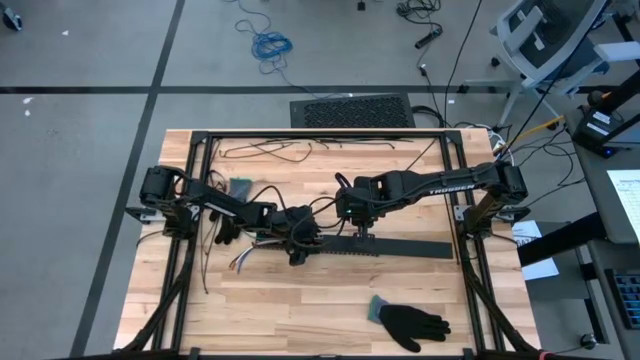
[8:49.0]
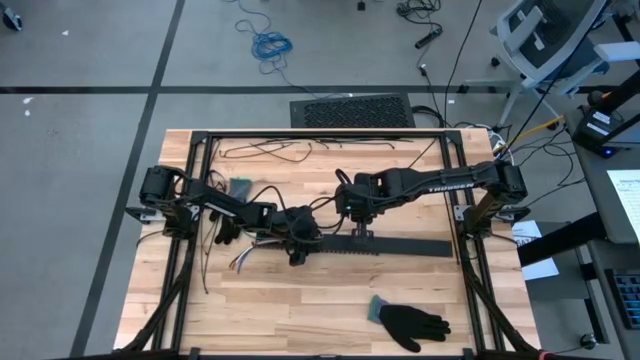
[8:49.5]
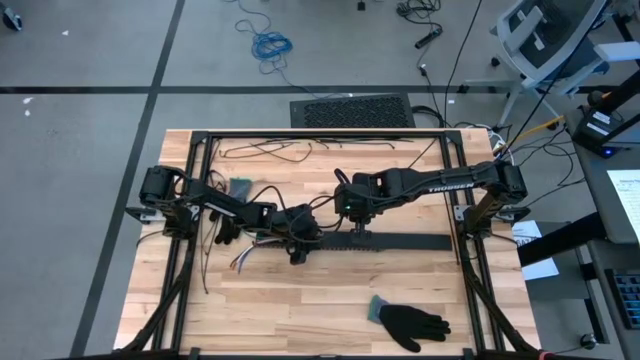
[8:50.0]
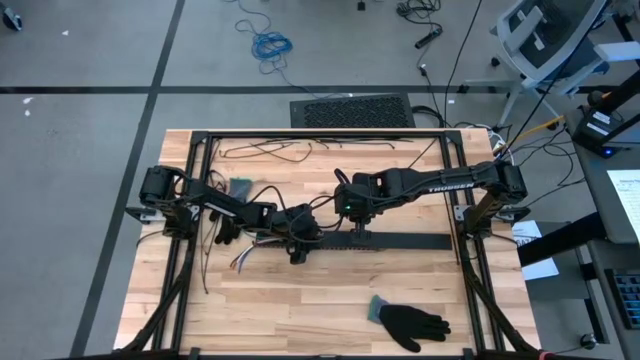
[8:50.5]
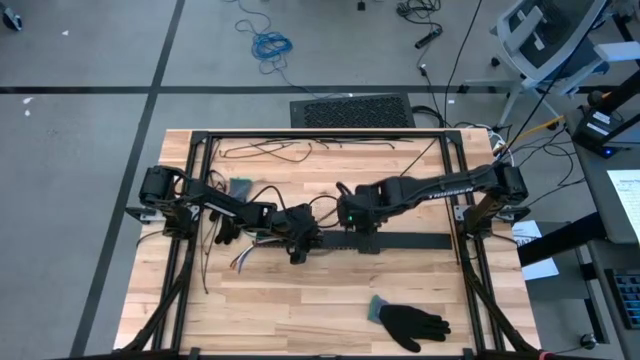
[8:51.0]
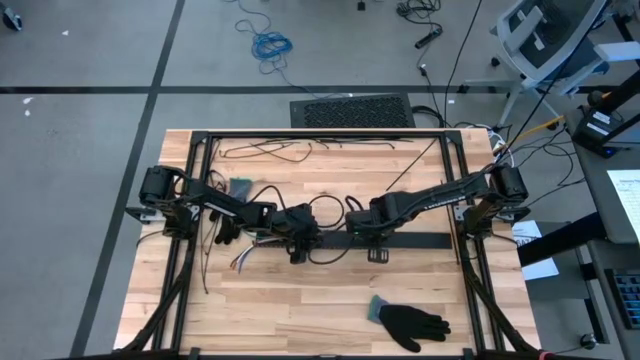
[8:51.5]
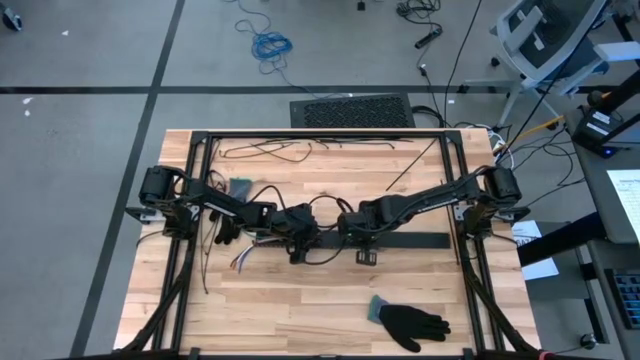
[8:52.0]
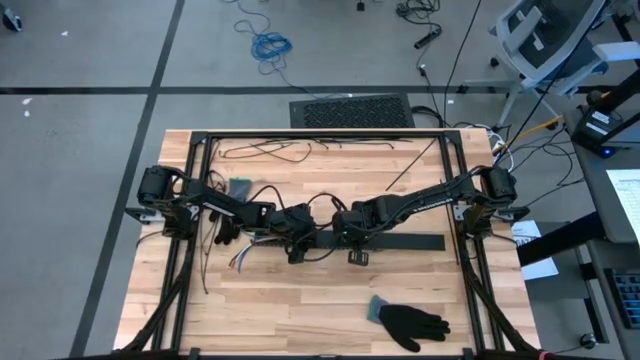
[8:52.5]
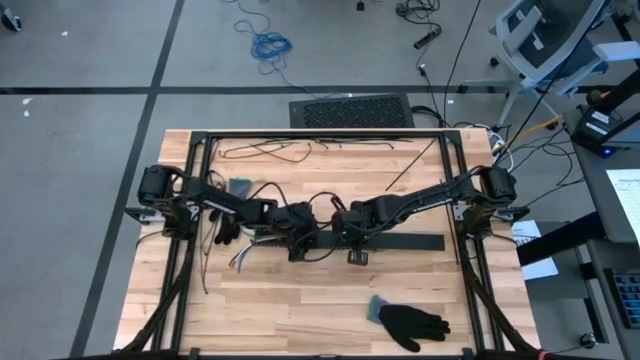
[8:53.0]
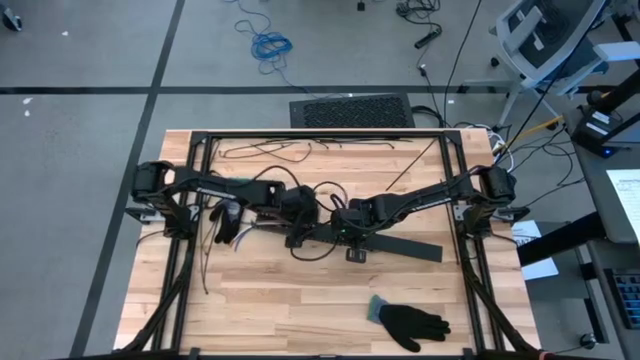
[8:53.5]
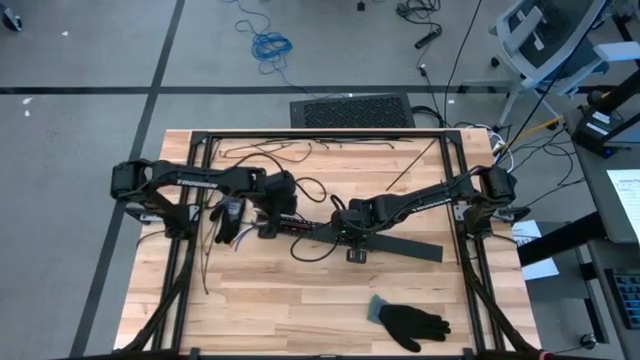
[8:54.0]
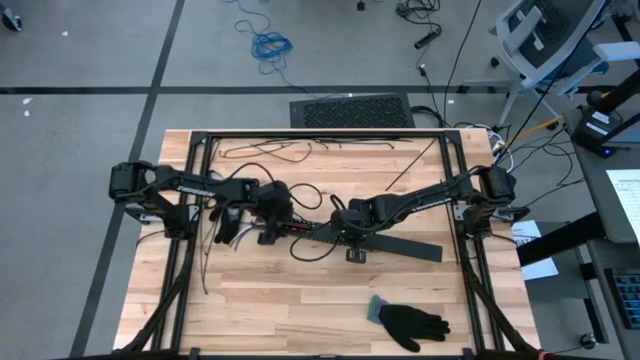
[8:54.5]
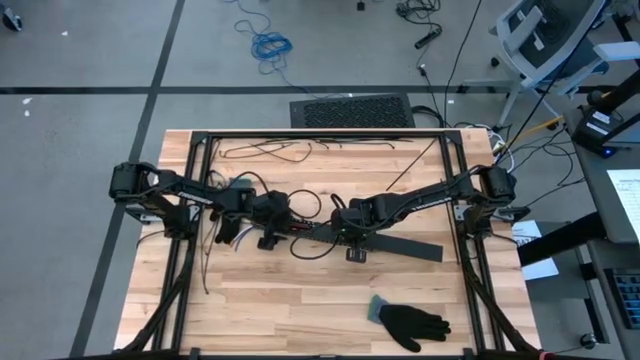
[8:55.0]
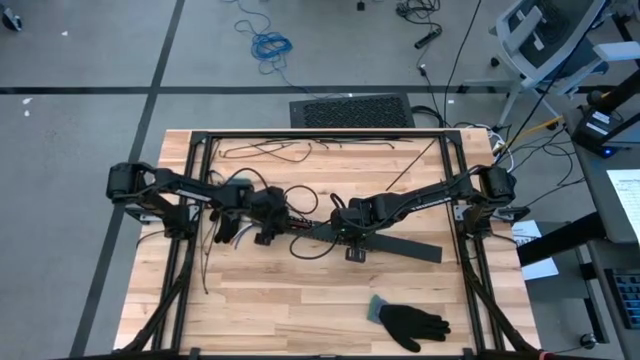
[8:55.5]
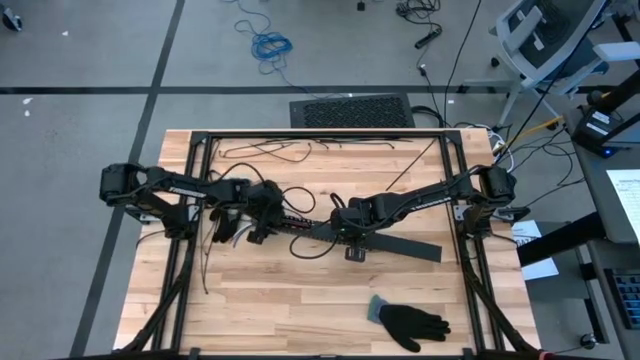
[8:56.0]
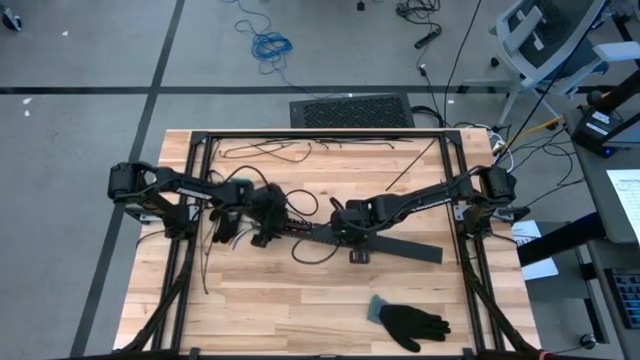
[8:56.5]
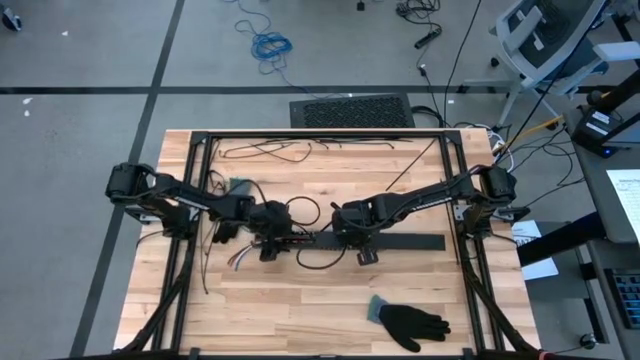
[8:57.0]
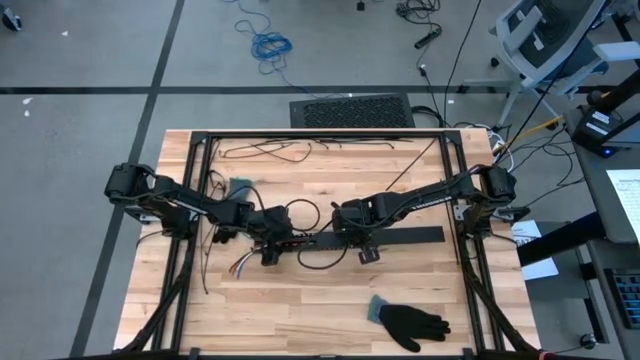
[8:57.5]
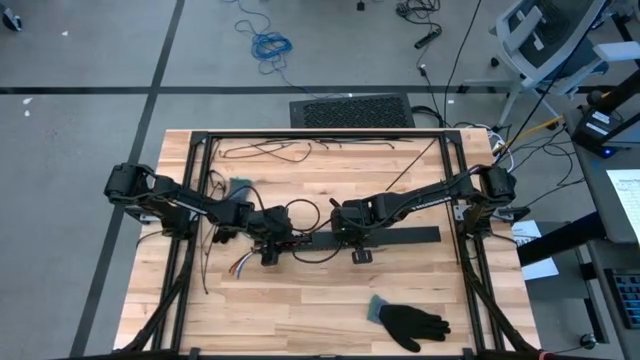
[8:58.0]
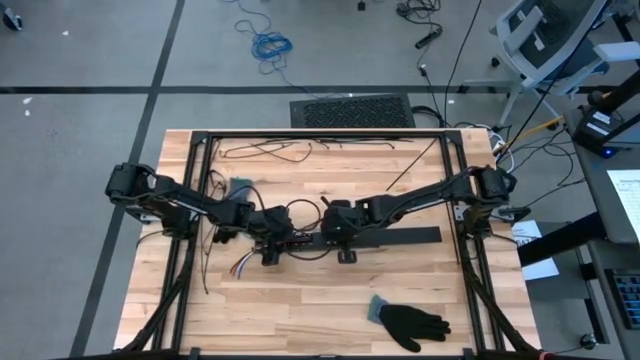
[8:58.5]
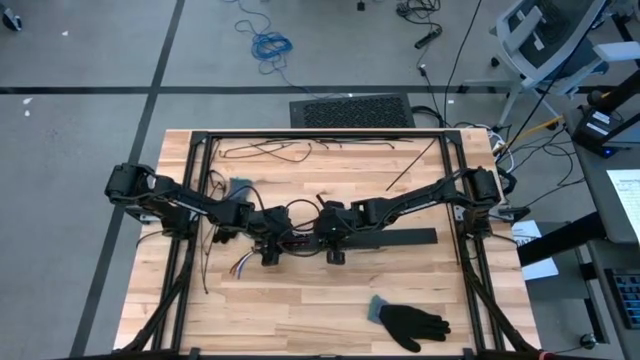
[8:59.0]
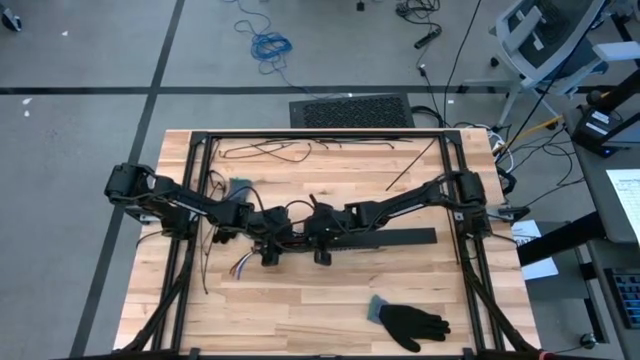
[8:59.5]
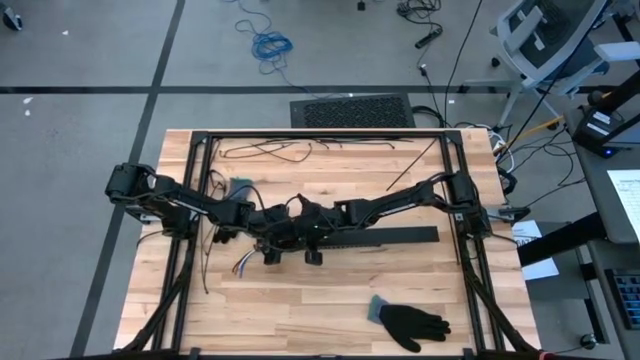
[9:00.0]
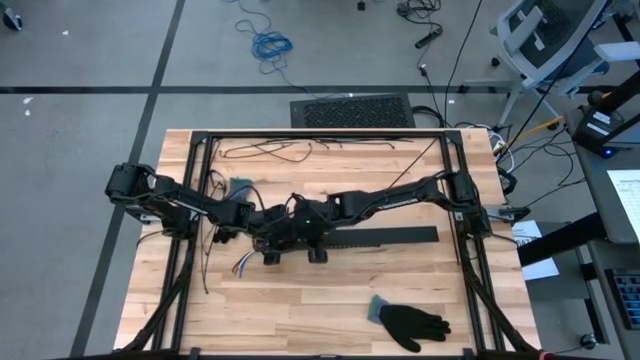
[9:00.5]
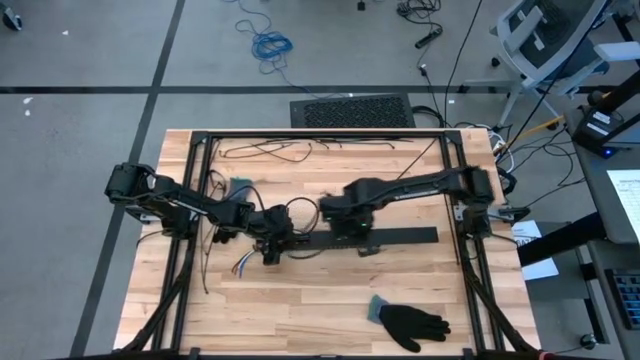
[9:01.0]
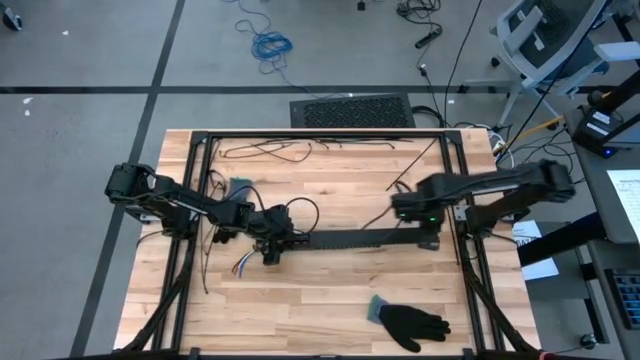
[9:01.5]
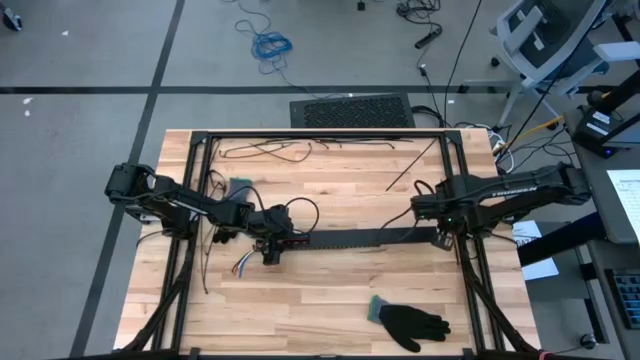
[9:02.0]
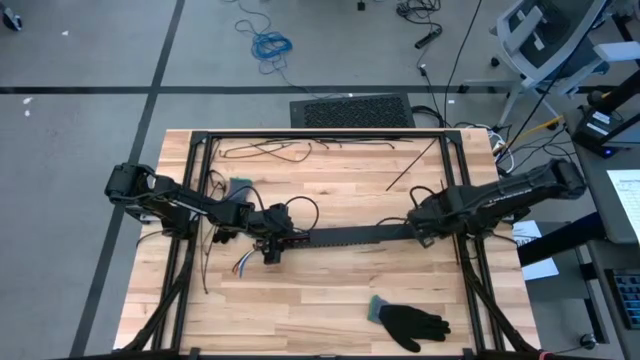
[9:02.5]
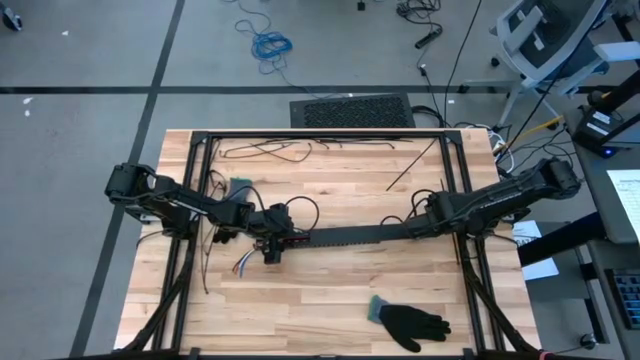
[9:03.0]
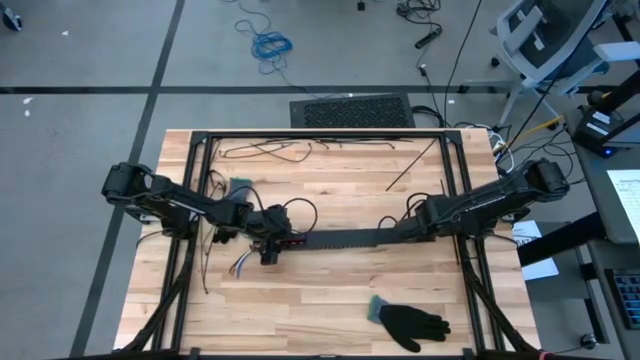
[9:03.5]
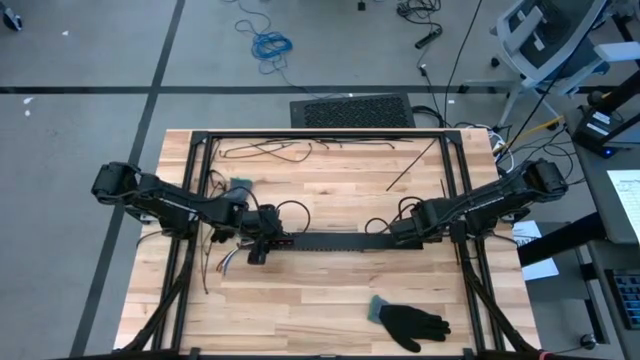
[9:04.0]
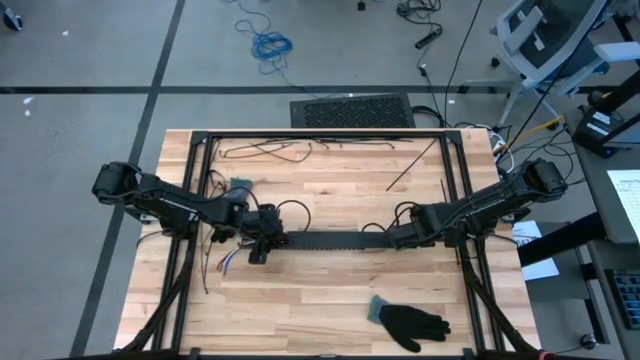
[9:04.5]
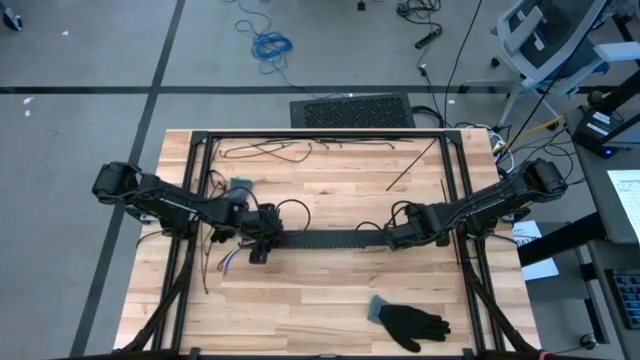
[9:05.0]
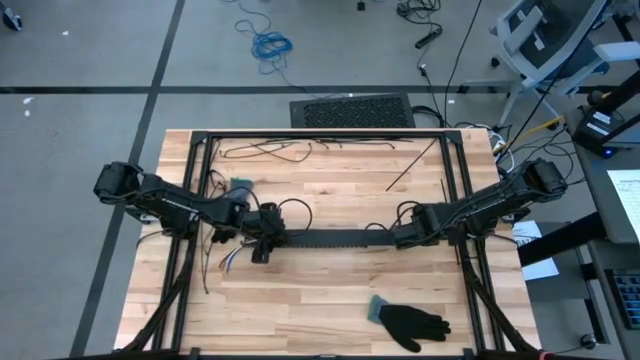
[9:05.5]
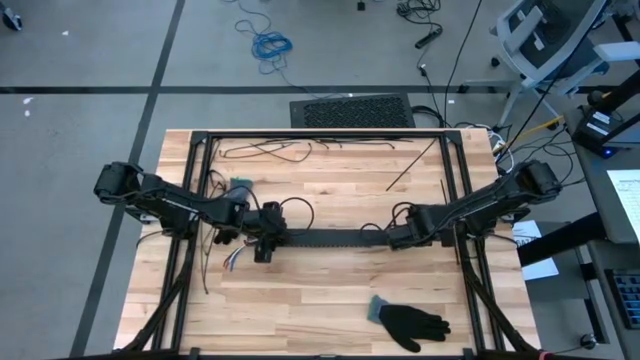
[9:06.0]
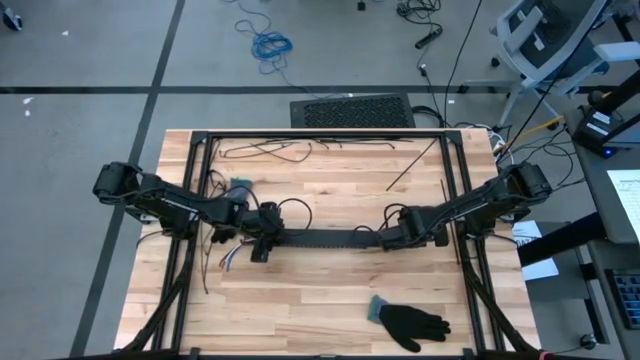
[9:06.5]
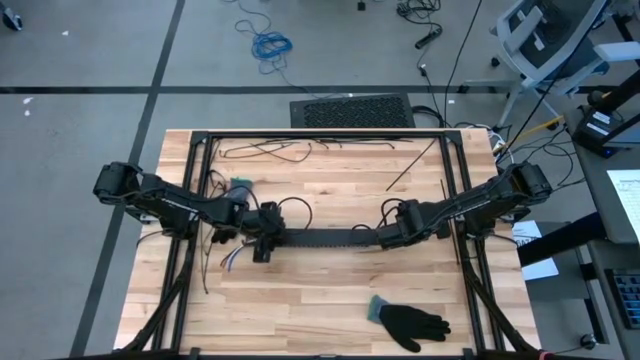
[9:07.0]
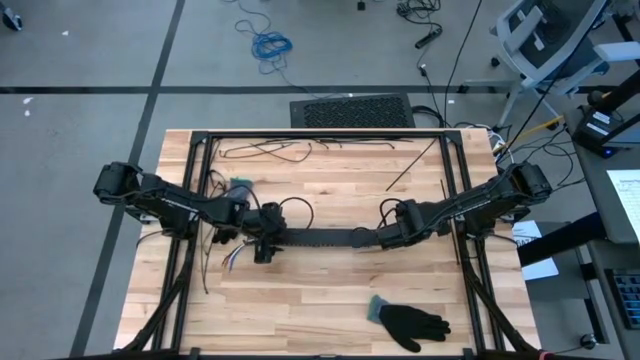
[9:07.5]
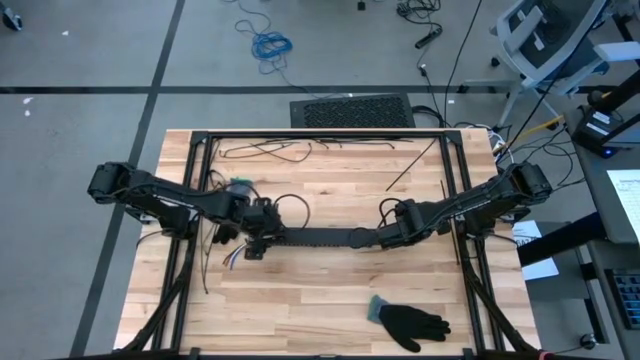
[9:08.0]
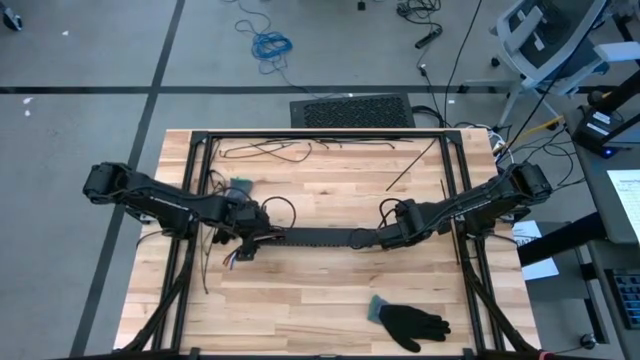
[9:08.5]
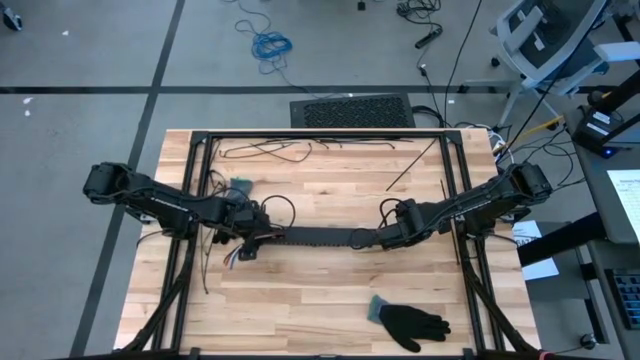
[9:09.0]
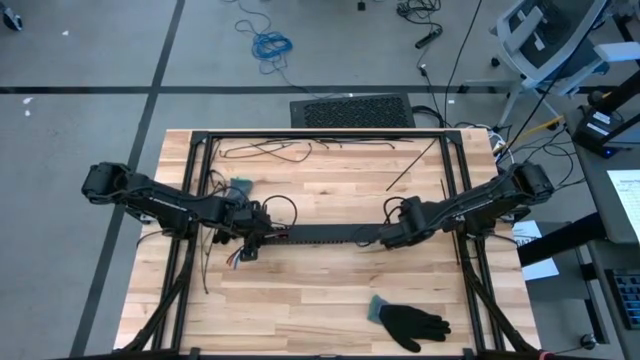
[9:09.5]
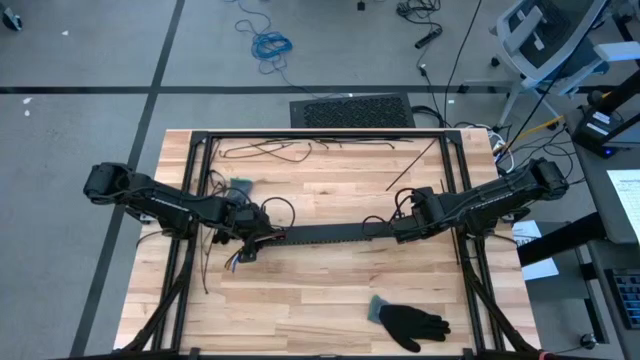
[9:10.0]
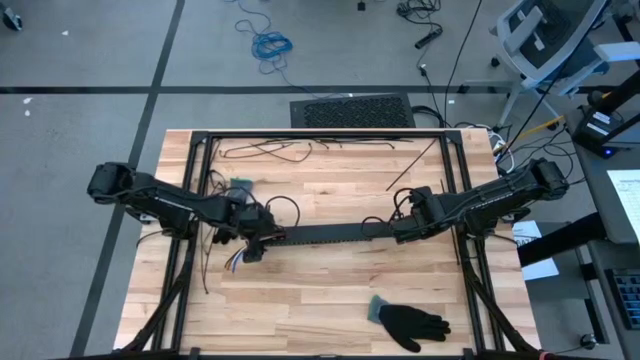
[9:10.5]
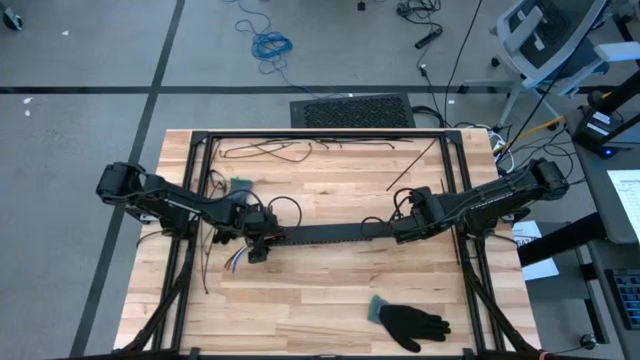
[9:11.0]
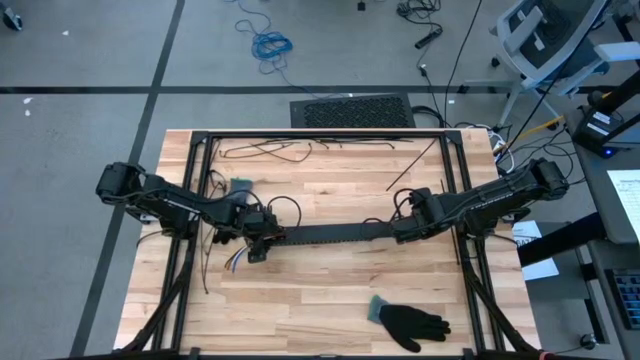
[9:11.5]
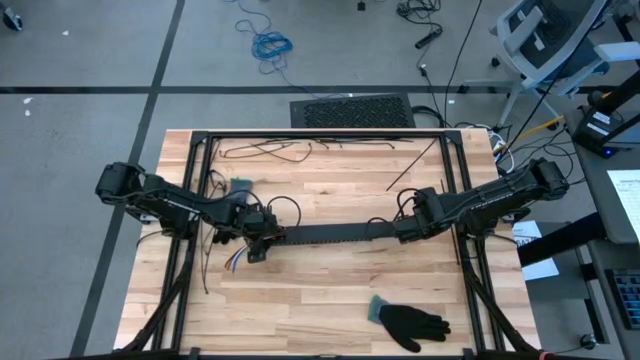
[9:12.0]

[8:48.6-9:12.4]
Task: Ziptie cables
Close the cable duct with the cable duct cover
